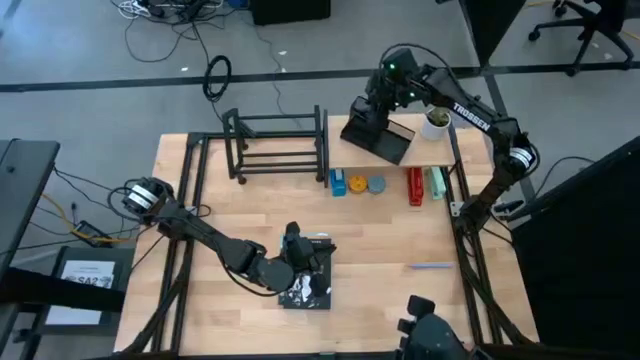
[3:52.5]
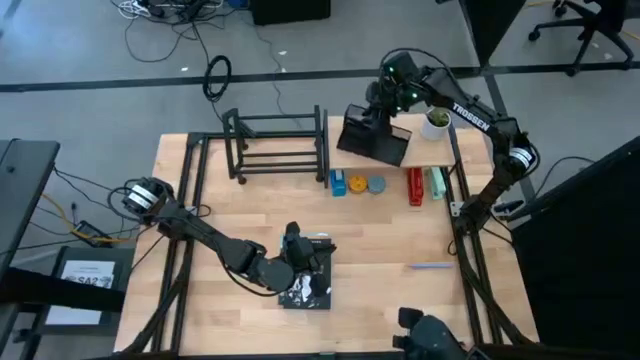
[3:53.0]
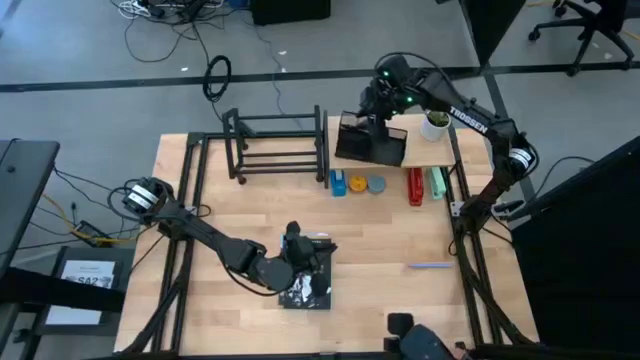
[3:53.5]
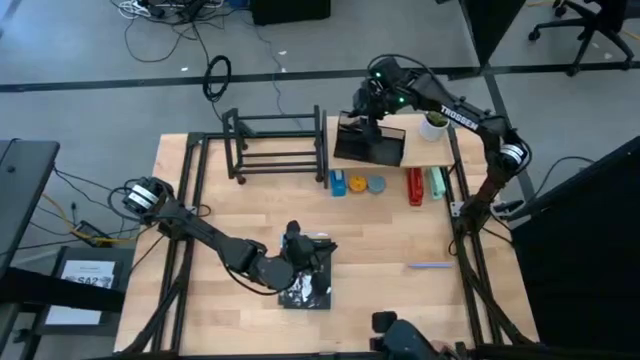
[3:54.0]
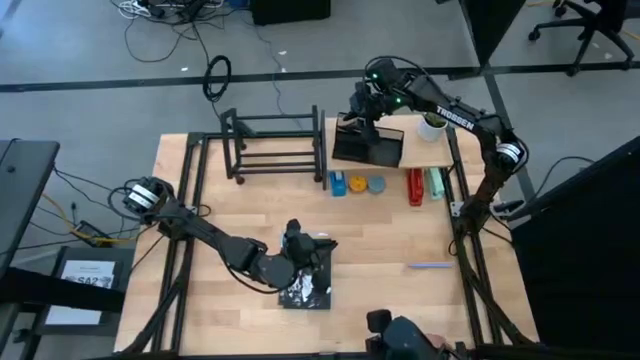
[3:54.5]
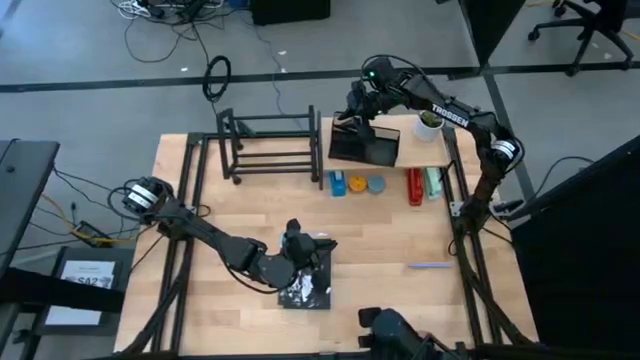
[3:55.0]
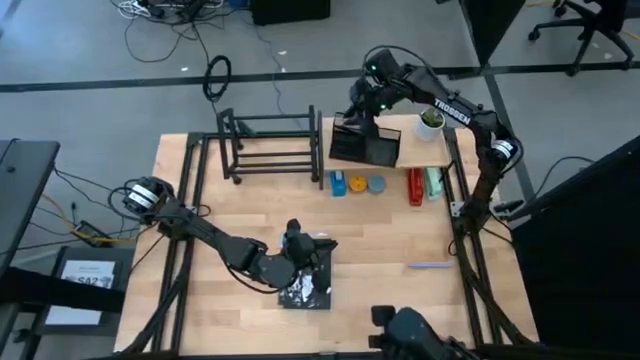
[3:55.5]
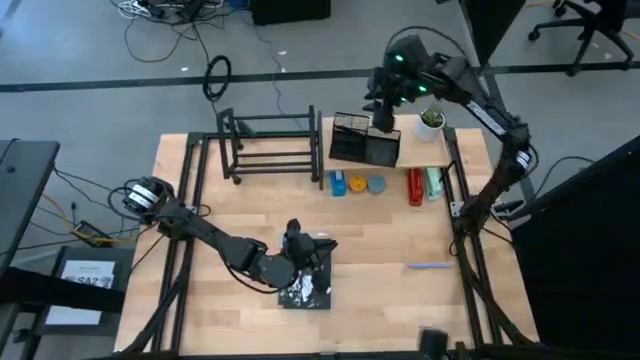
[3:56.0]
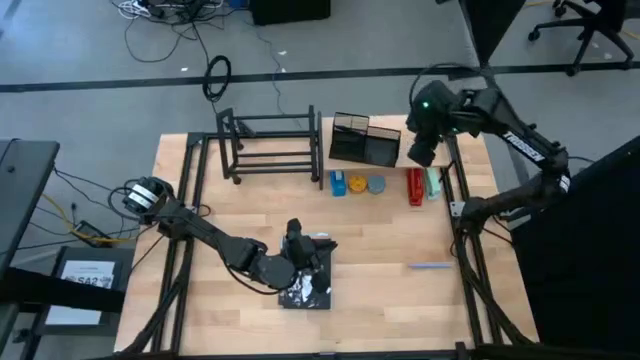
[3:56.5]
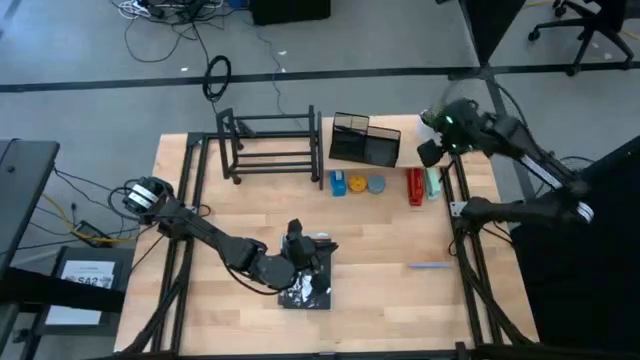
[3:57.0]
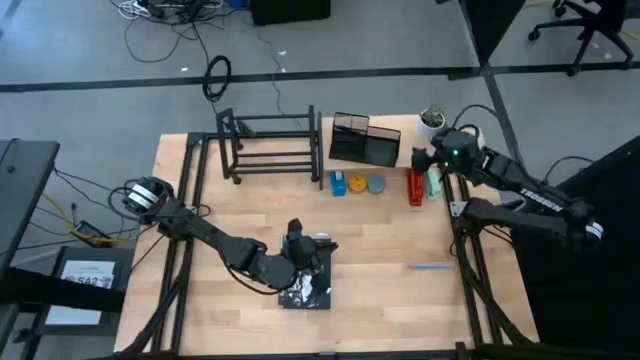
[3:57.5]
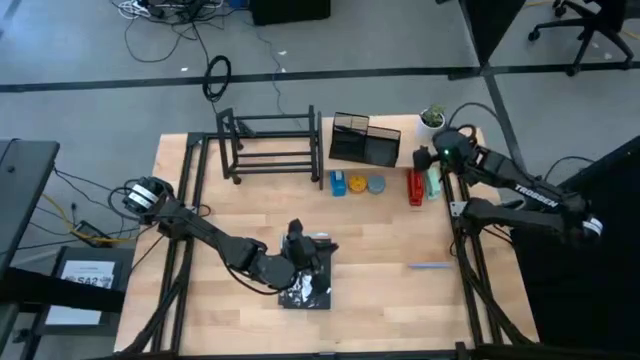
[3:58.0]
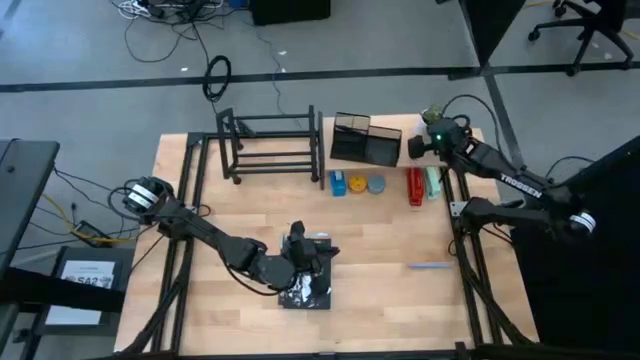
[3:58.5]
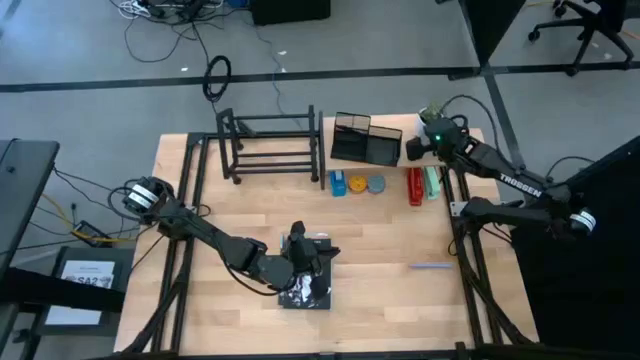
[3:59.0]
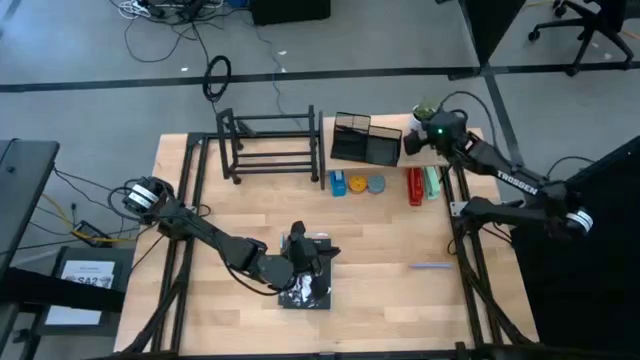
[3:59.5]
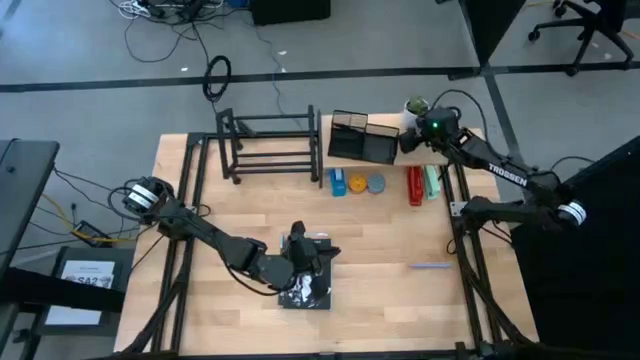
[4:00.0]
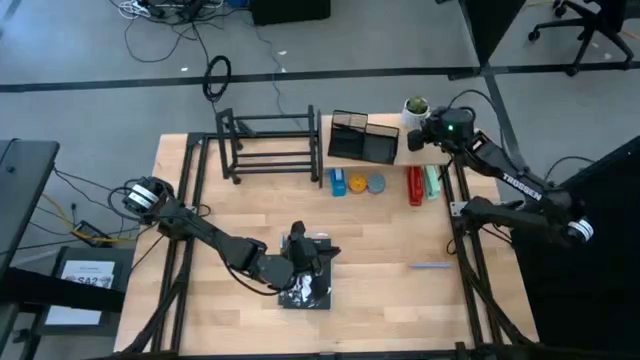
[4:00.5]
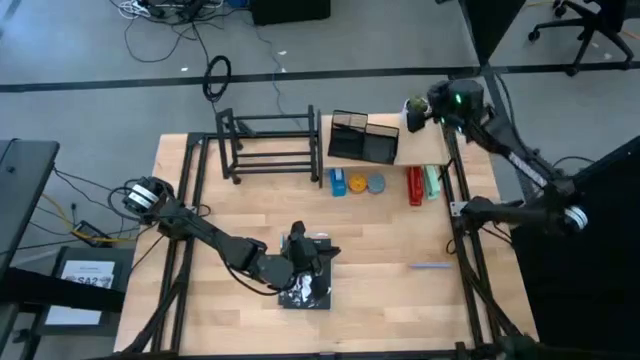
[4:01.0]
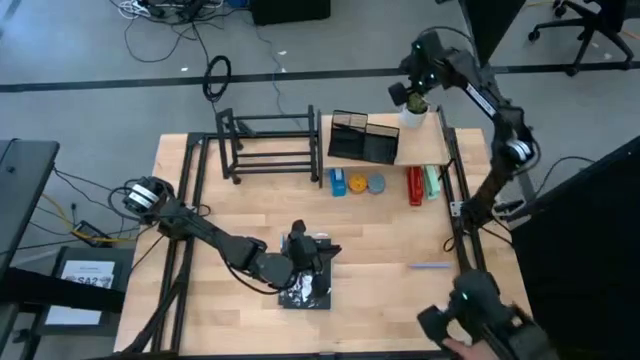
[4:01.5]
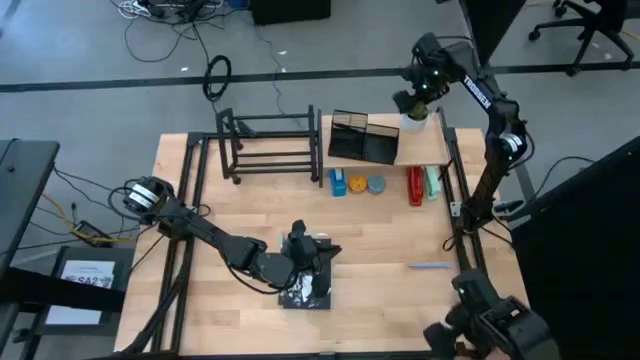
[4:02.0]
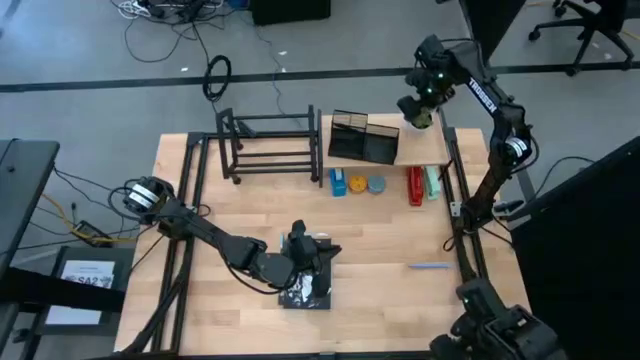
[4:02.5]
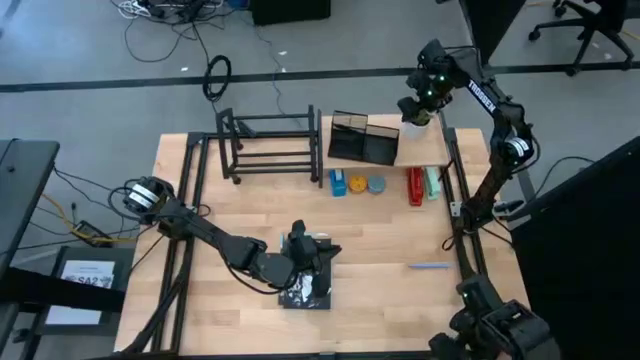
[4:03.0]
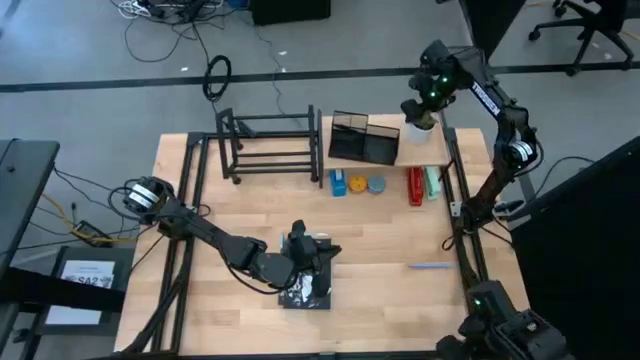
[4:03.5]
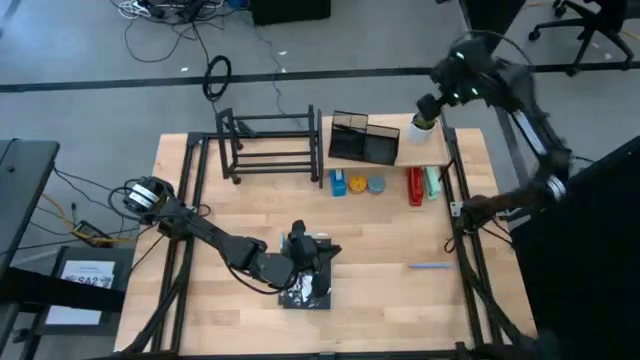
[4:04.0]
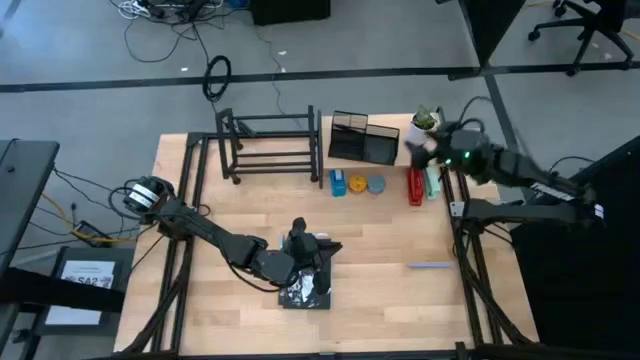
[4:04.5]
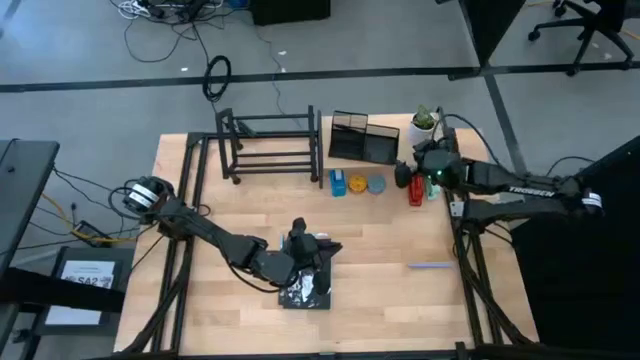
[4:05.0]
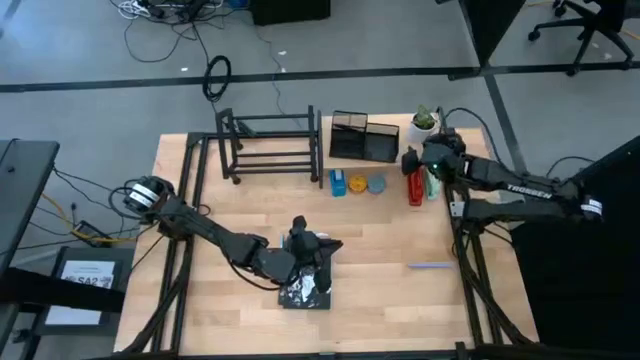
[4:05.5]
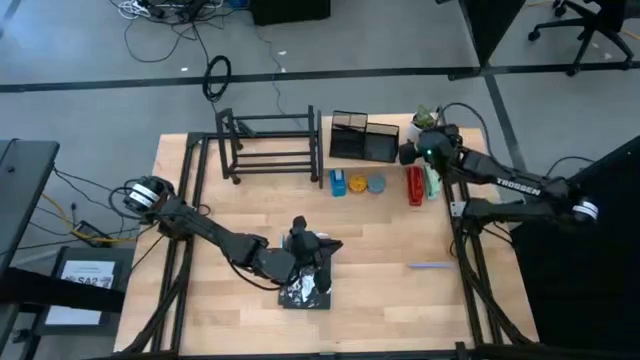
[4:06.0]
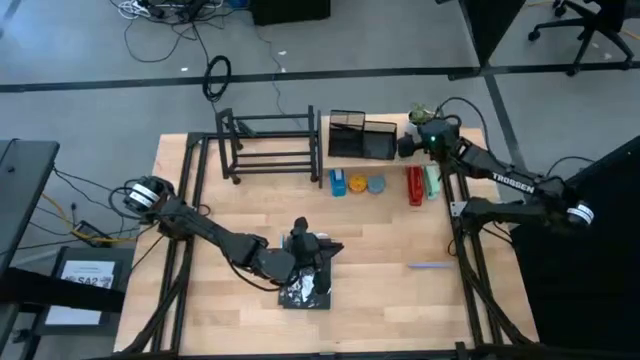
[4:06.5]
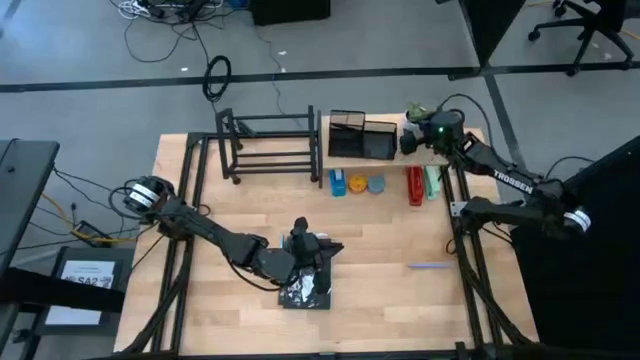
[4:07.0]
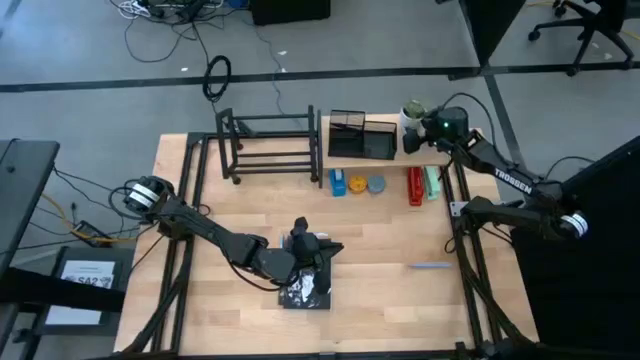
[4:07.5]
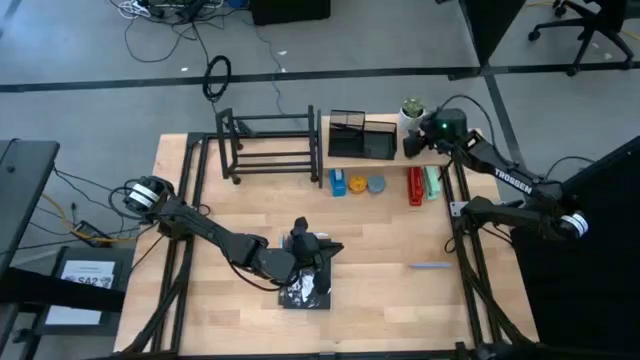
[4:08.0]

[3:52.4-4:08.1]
Task: Stock shelves
Remove the white vase plant from the shelf

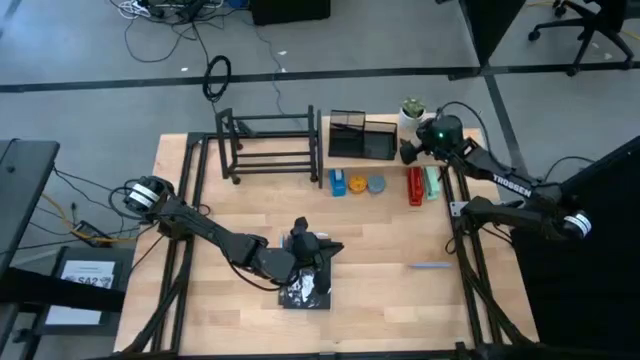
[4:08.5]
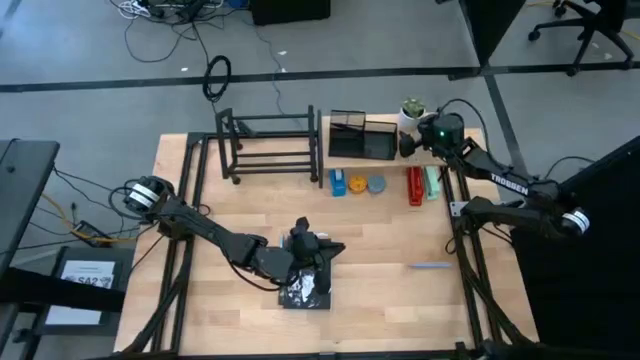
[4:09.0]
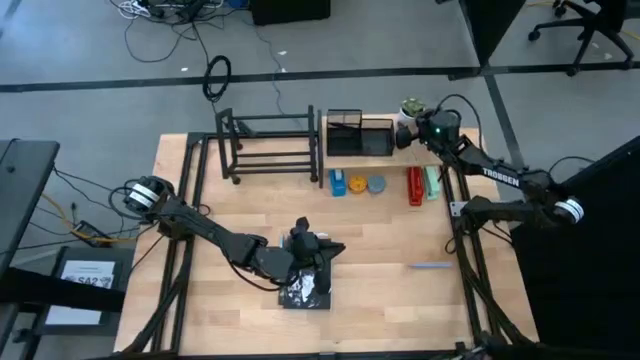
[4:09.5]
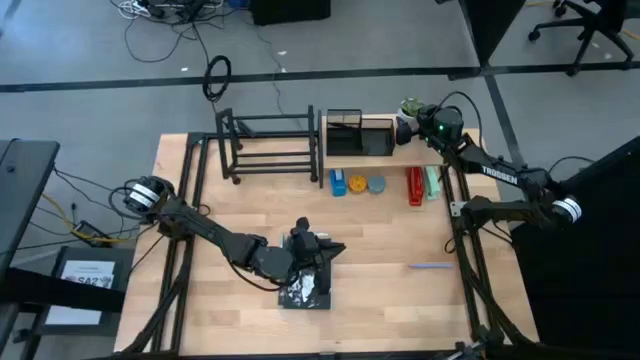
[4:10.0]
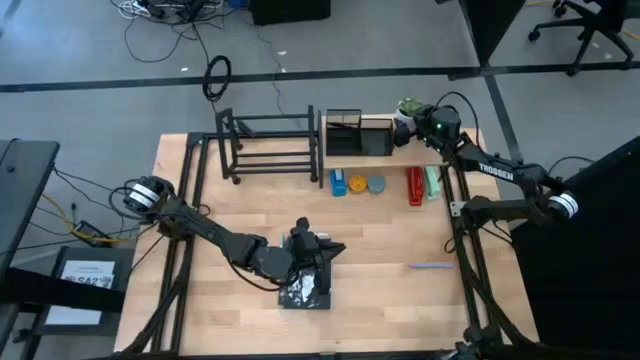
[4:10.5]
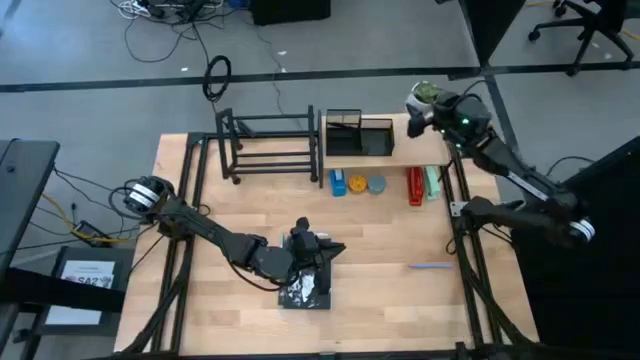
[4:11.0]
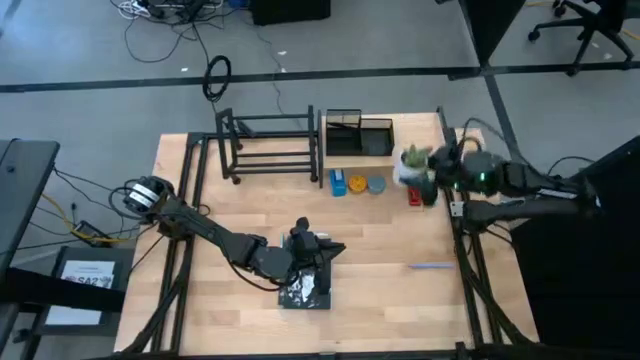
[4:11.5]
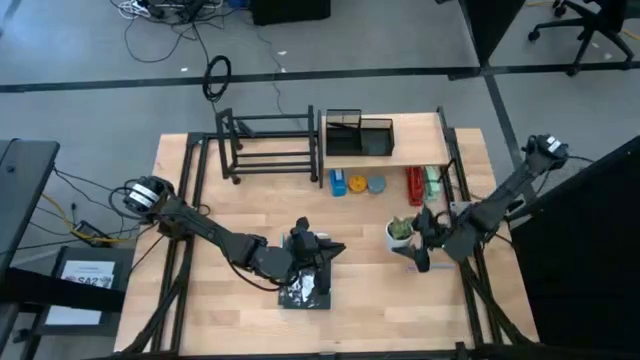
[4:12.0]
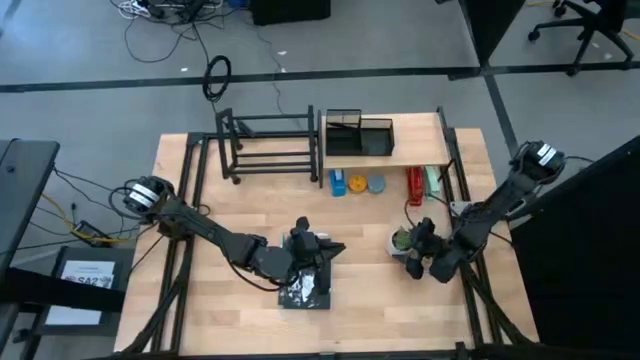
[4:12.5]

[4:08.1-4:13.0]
Remove the white vase plant from the shelf

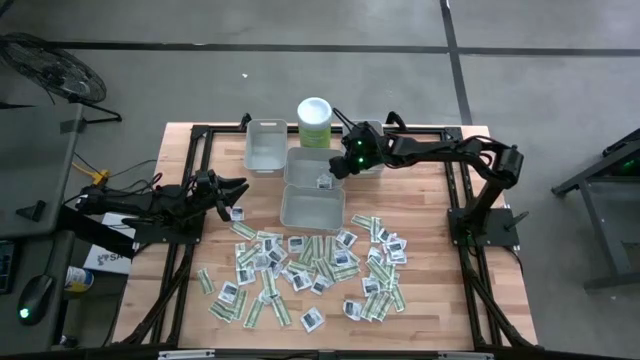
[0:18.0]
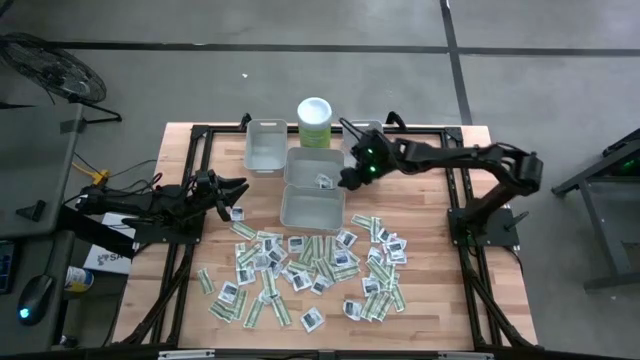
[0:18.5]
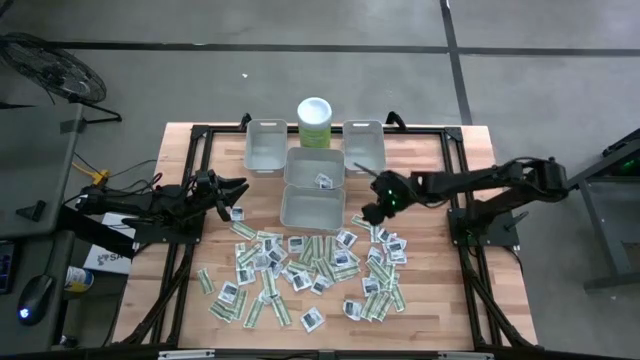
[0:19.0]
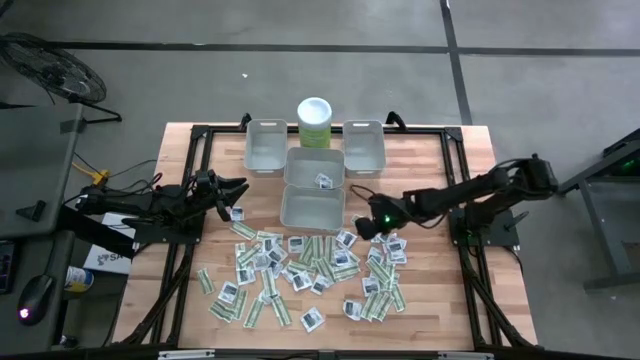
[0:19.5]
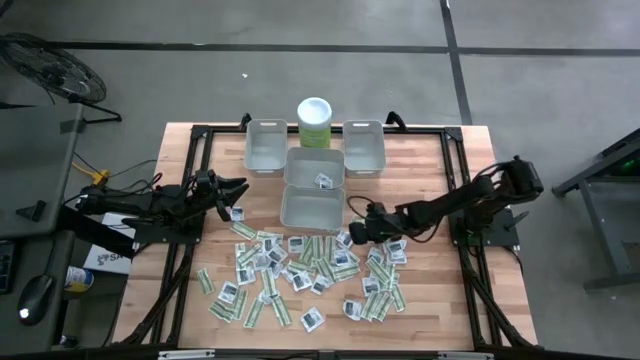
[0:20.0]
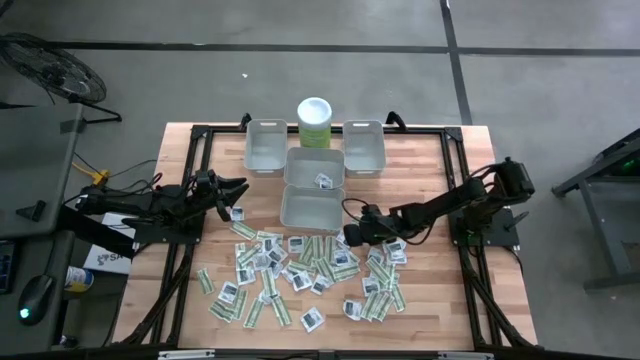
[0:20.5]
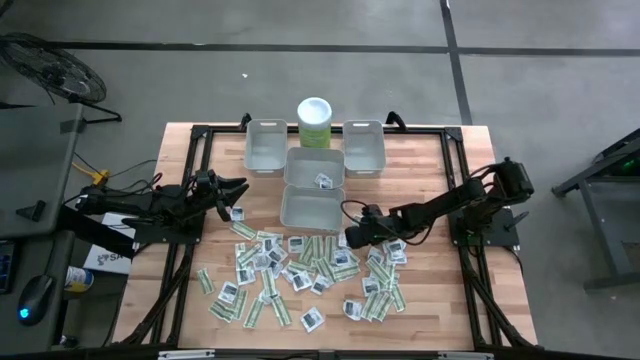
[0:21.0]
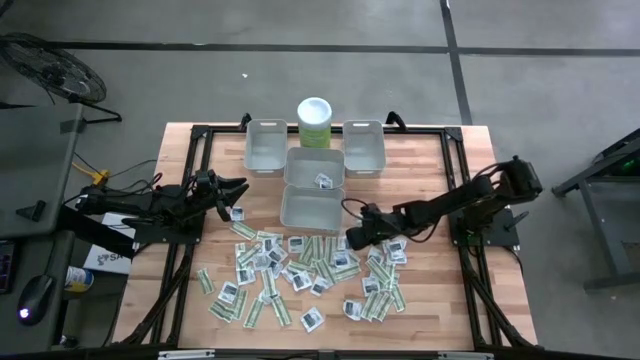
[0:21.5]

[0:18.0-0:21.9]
Task: Pick & Place First Aid Supplies
Put the towelette pack into the right bin
